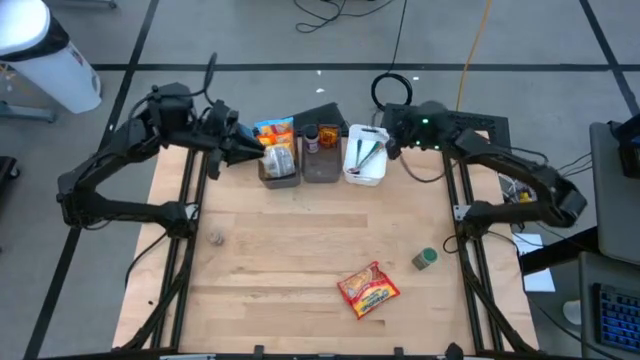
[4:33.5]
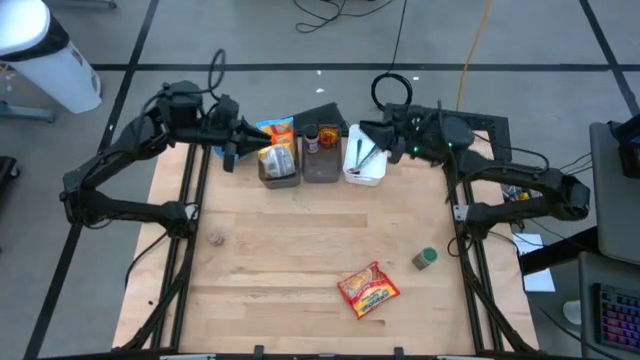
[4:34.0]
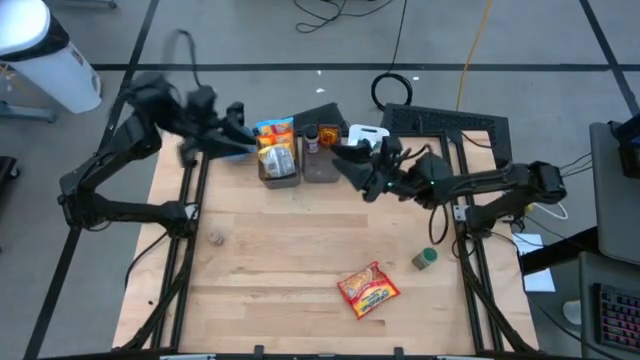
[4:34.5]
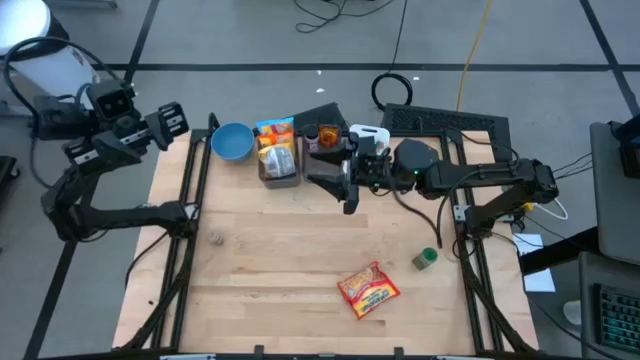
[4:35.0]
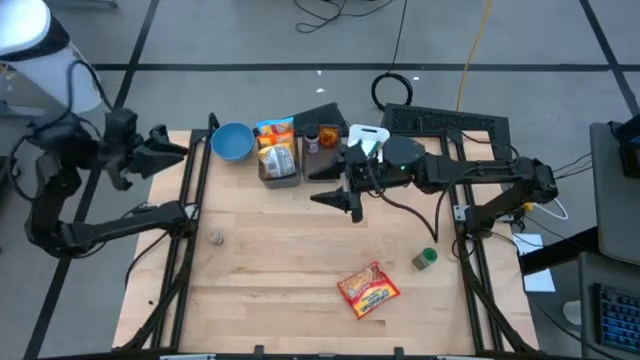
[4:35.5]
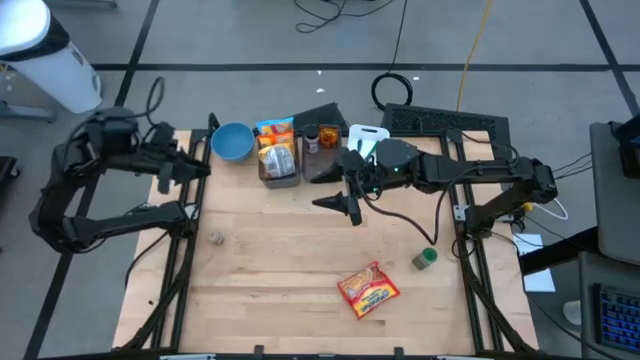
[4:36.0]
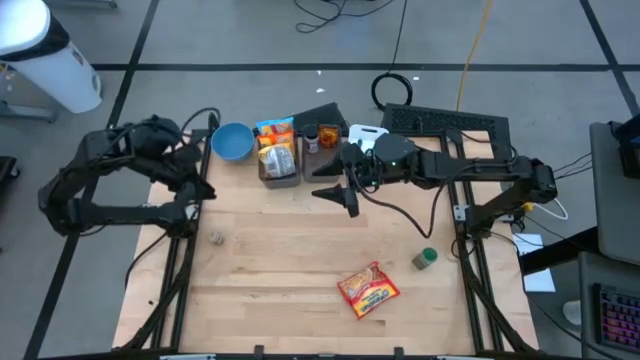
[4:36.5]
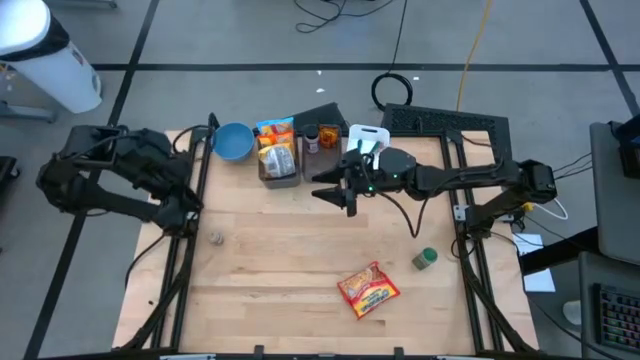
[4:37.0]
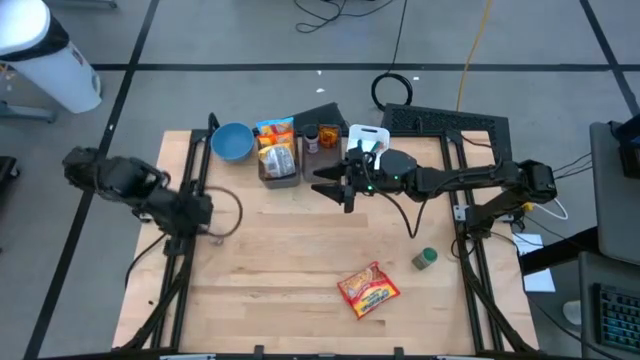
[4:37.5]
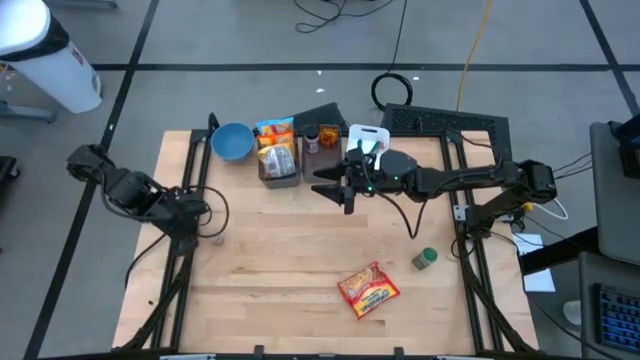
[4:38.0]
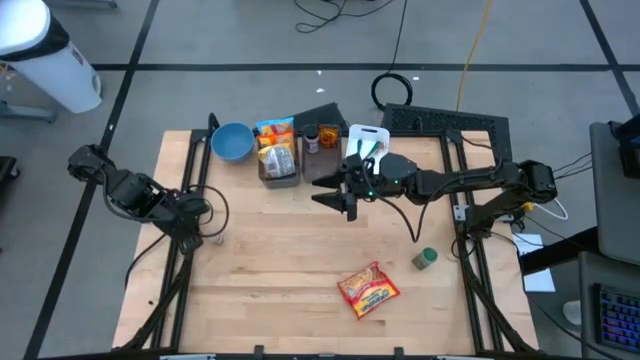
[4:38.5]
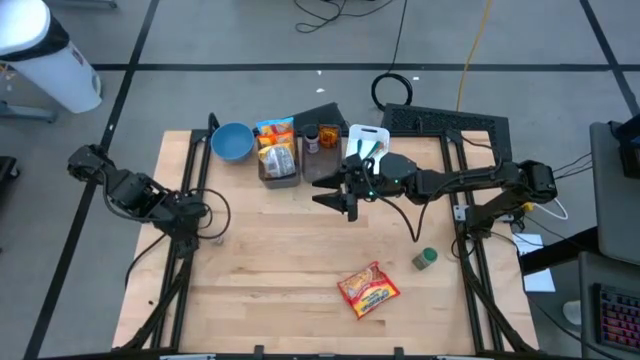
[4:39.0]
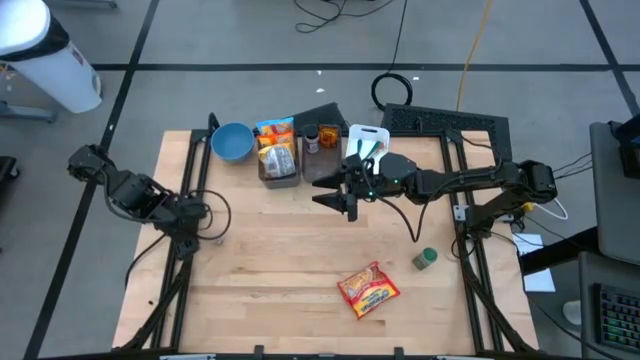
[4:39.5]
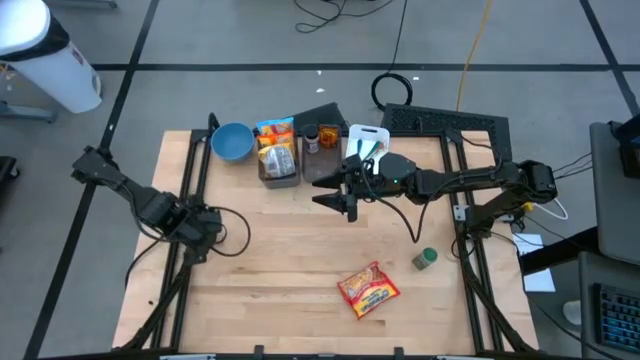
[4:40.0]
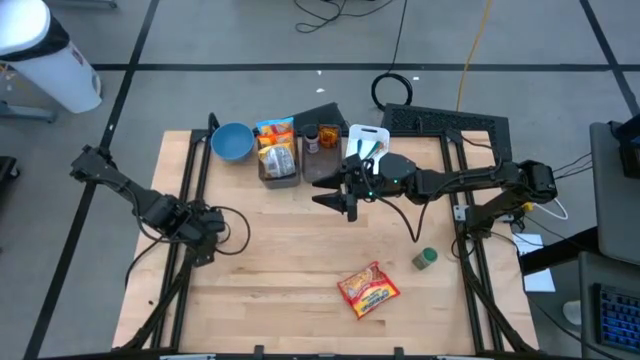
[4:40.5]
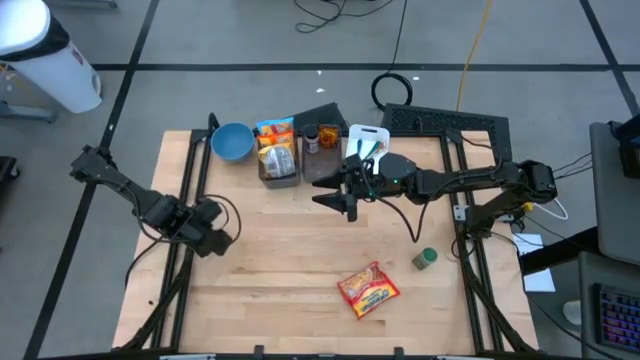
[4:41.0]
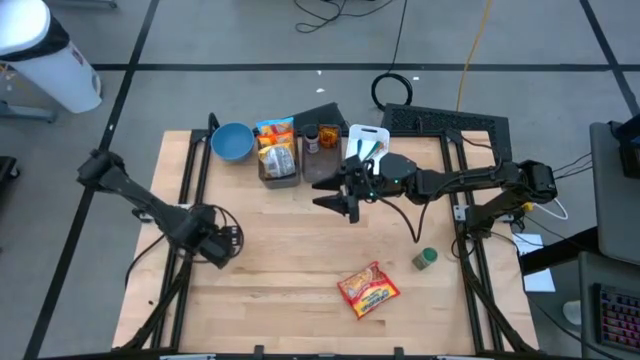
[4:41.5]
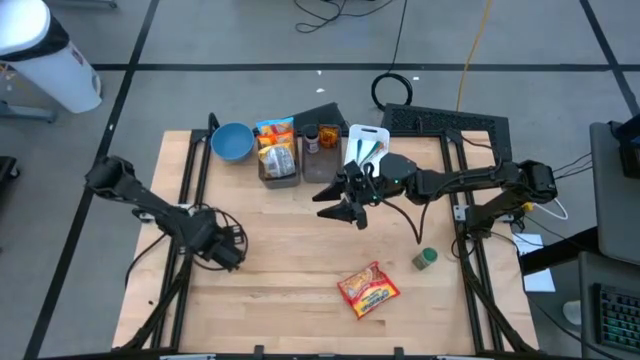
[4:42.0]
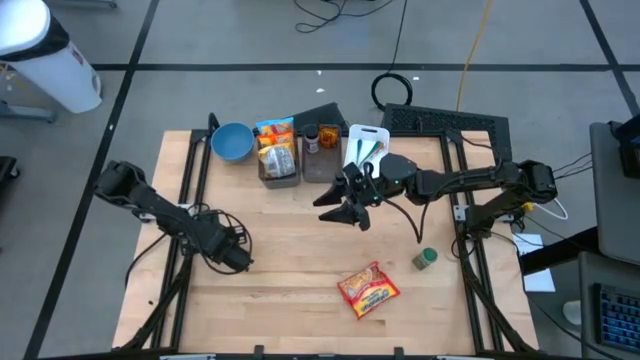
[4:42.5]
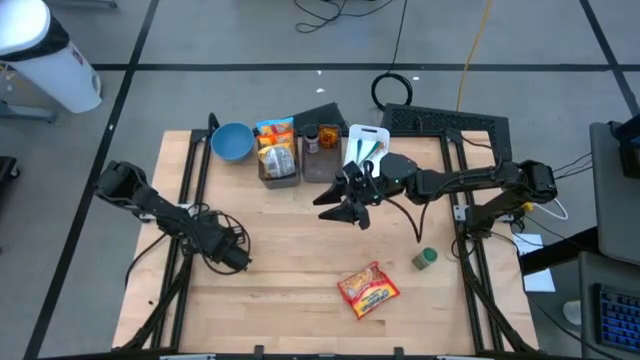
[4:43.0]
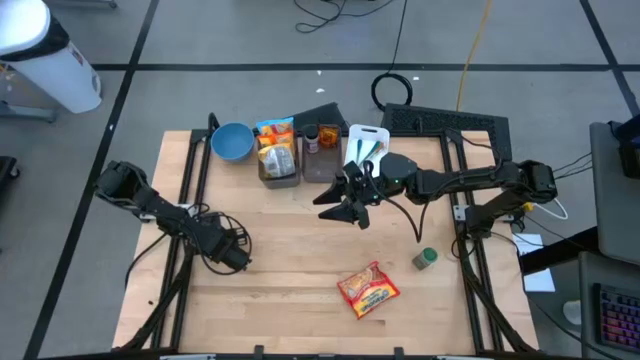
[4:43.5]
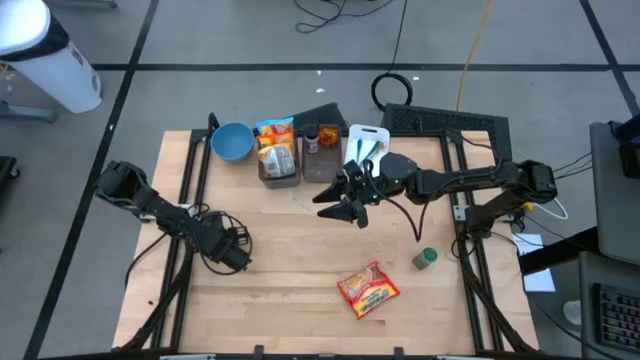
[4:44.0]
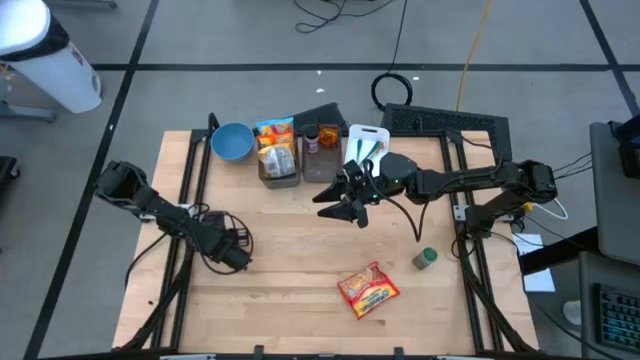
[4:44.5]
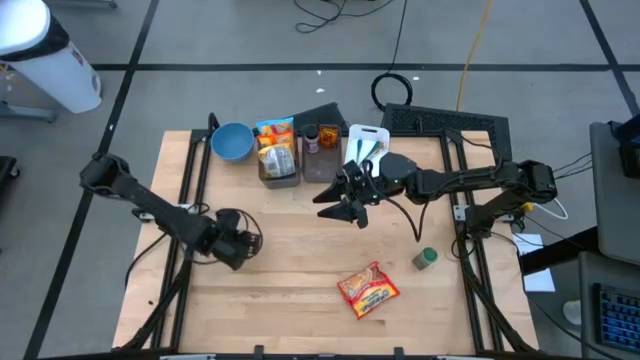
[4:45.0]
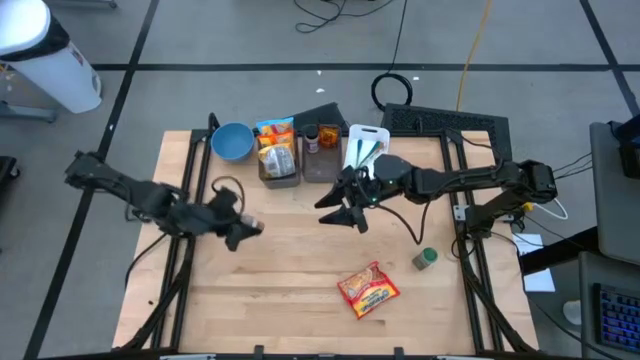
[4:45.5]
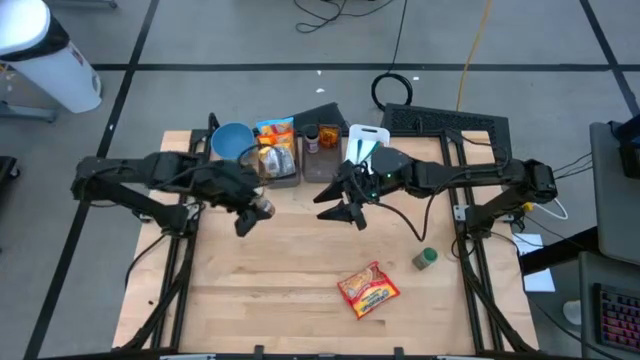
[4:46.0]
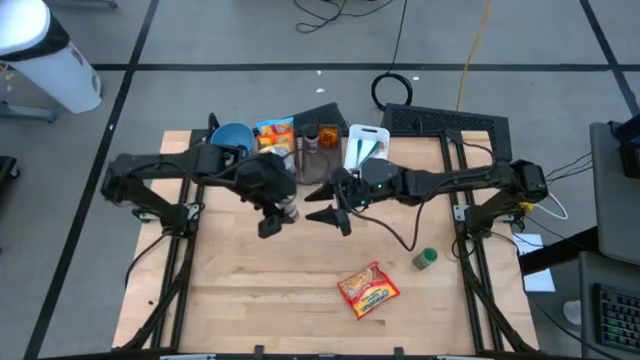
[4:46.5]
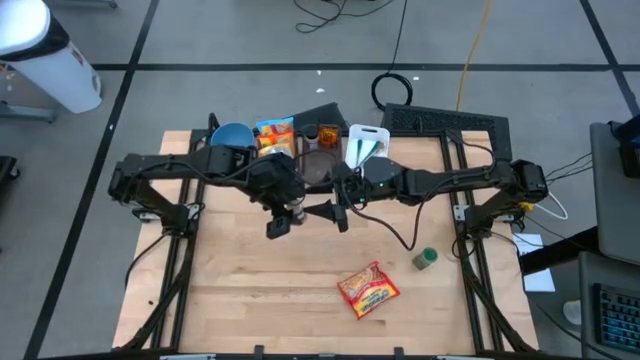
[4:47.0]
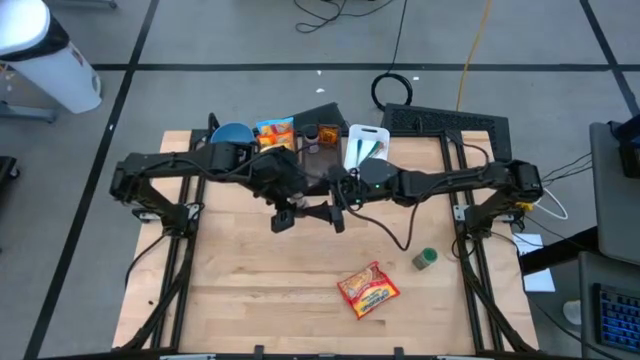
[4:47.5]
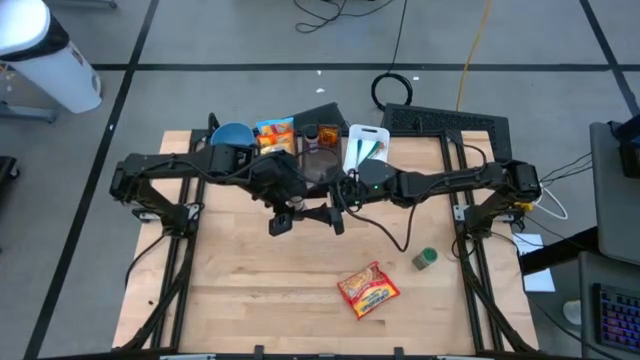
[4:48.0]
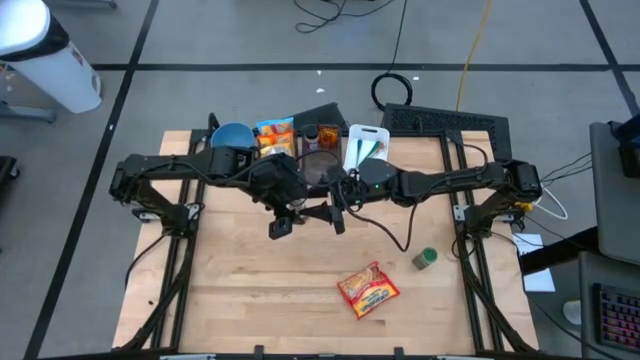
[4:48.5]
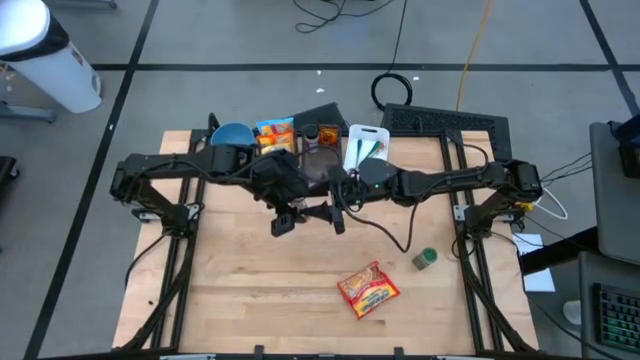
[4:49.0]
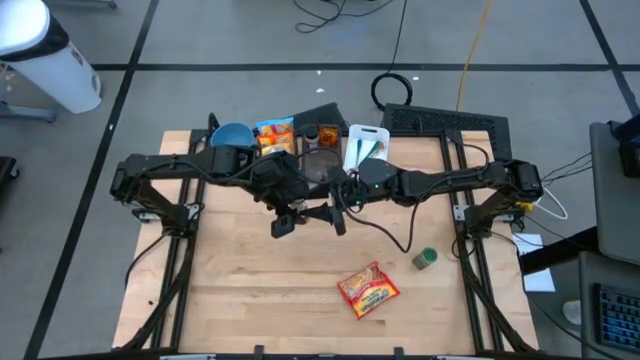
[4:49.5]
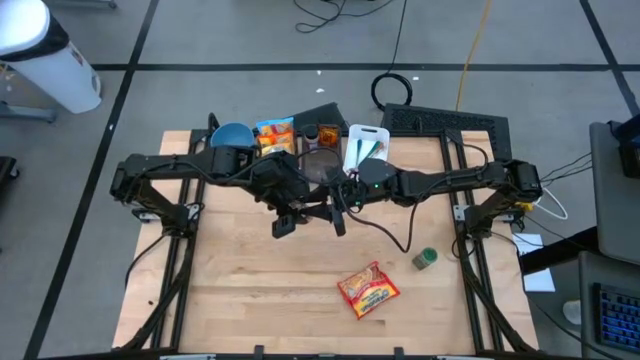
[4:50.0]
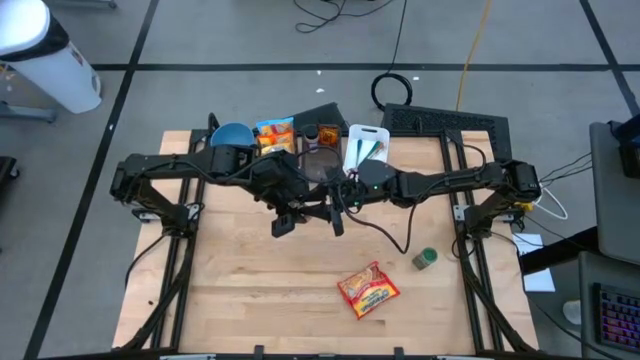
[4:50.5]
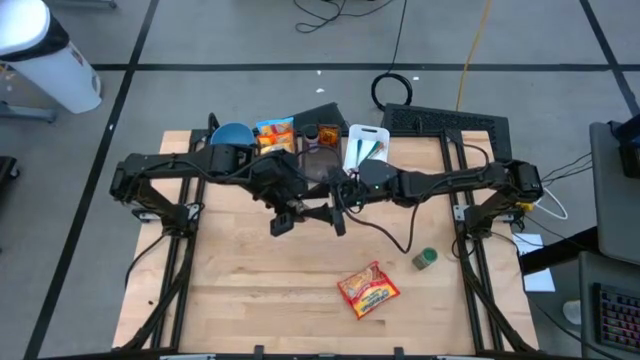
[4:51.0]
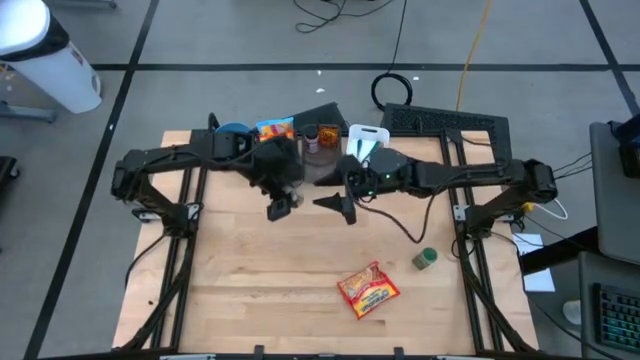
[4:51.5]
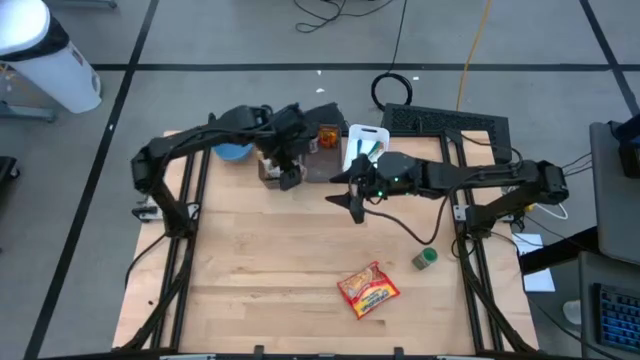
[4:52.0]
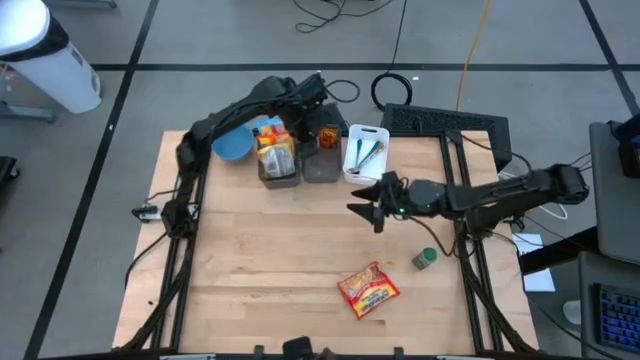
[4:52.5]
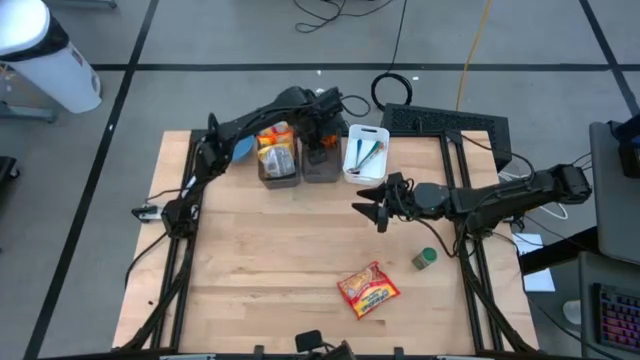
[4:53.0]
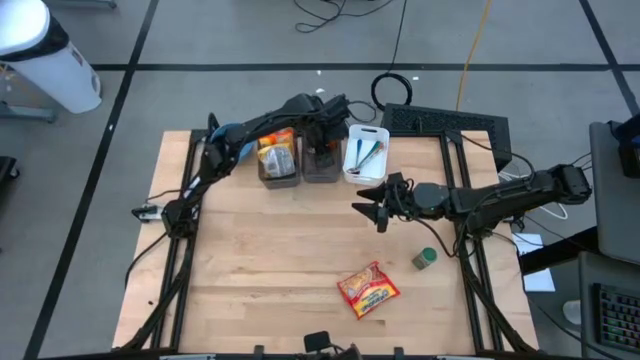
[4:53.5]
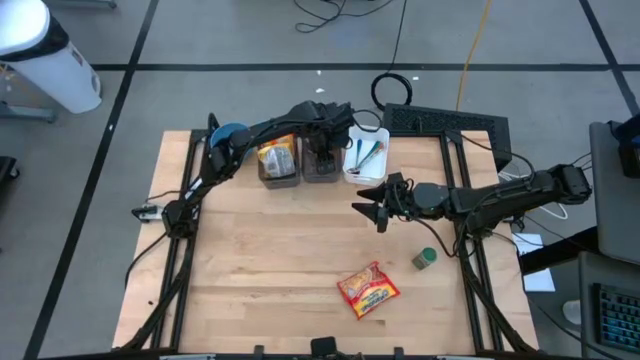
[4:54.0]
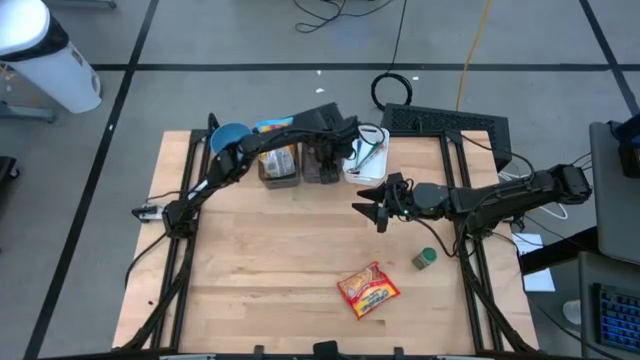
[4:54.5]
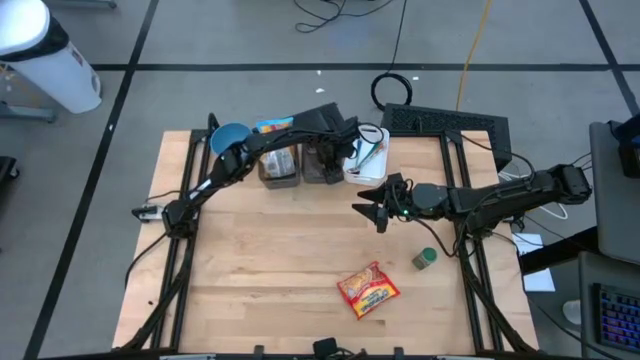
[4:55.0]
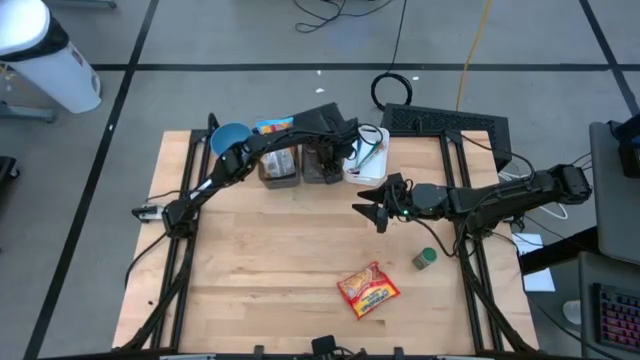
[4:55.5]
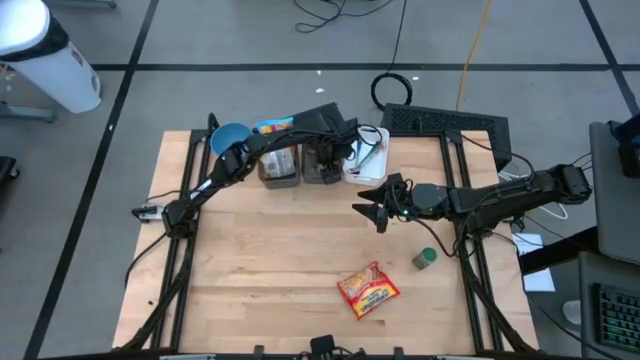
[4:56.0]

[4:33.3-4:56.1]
Task: Pick & Place Food Item
Put the brown seasoning bottle into the right black bin
